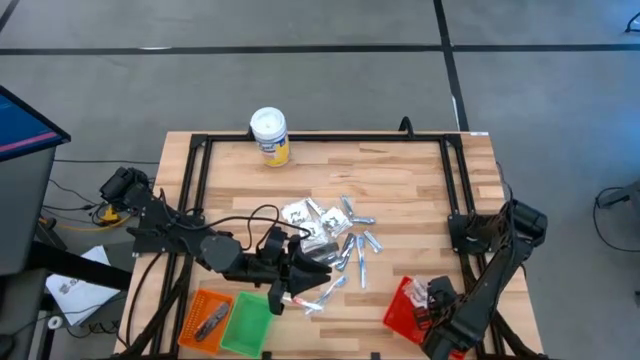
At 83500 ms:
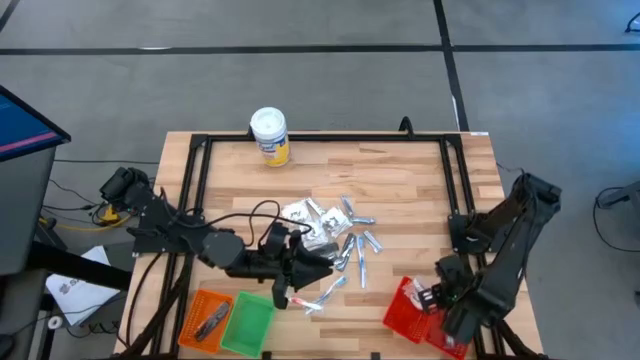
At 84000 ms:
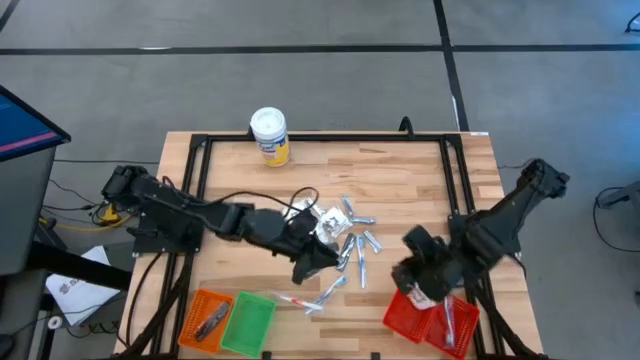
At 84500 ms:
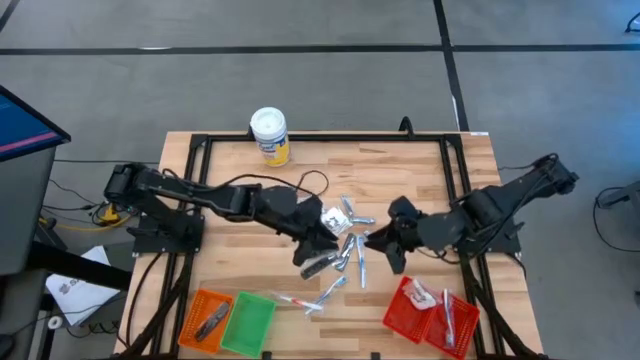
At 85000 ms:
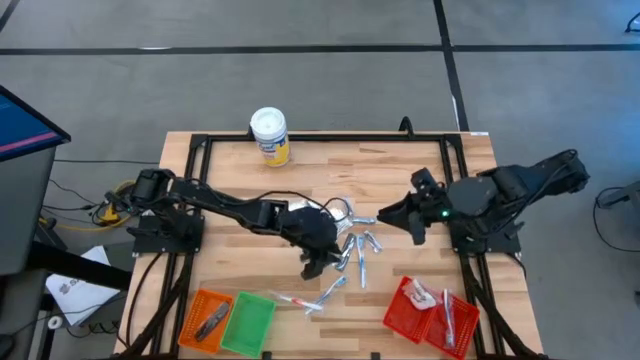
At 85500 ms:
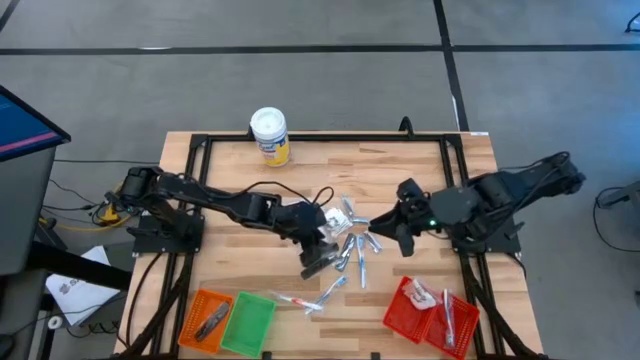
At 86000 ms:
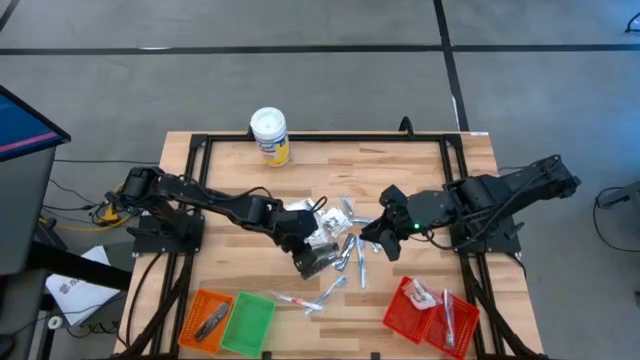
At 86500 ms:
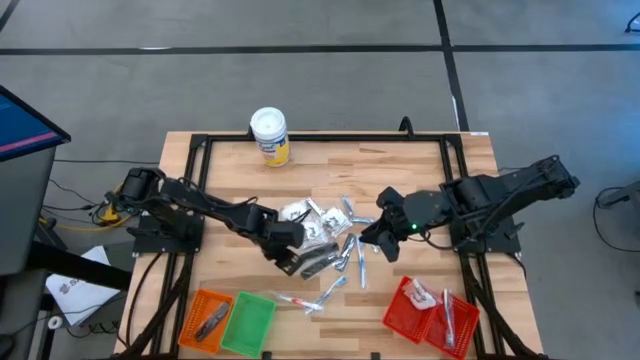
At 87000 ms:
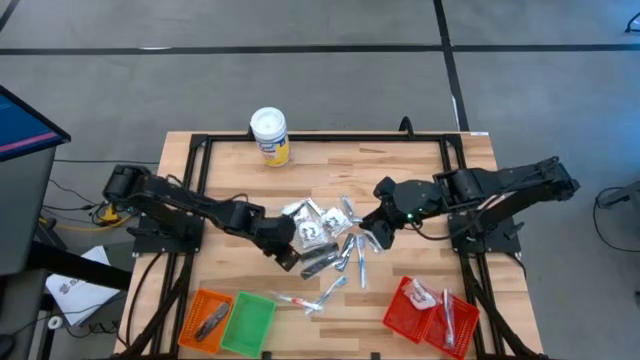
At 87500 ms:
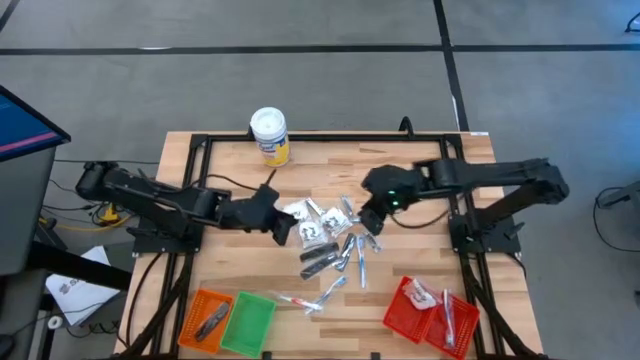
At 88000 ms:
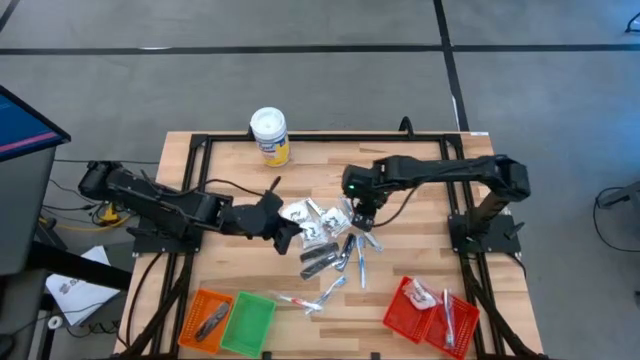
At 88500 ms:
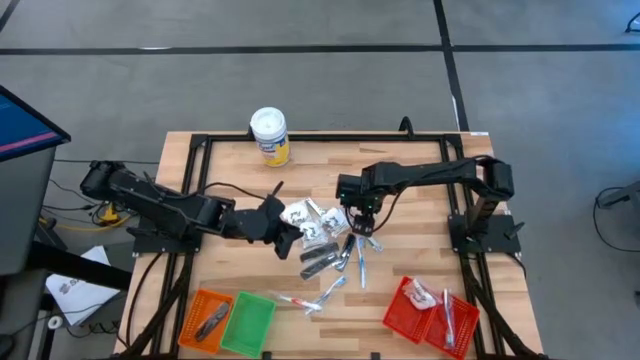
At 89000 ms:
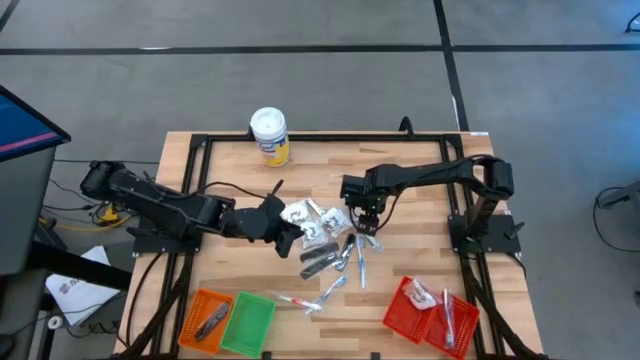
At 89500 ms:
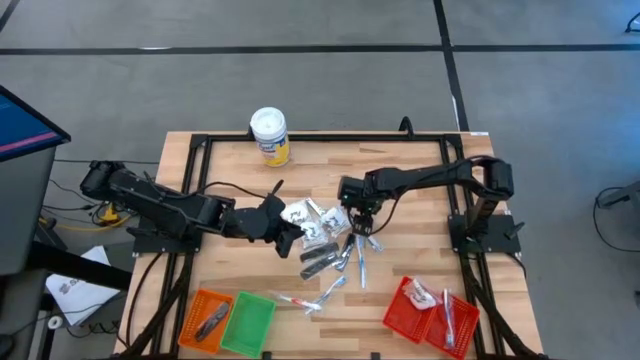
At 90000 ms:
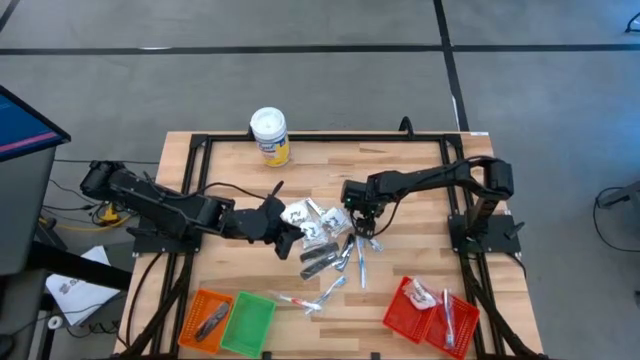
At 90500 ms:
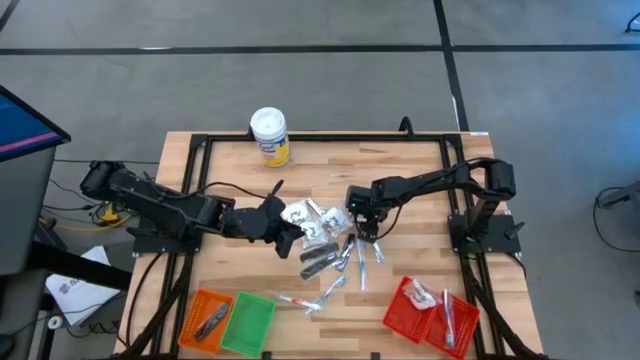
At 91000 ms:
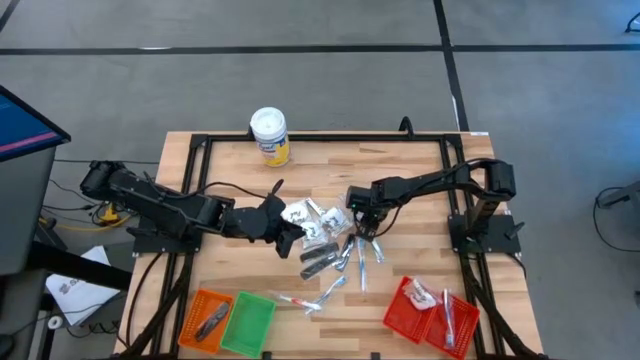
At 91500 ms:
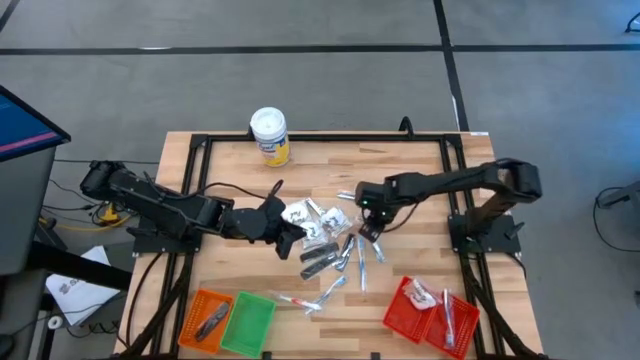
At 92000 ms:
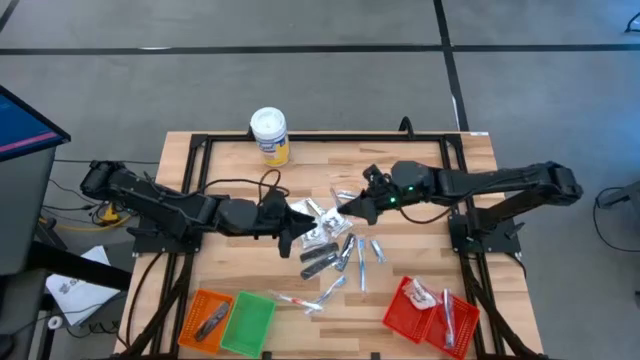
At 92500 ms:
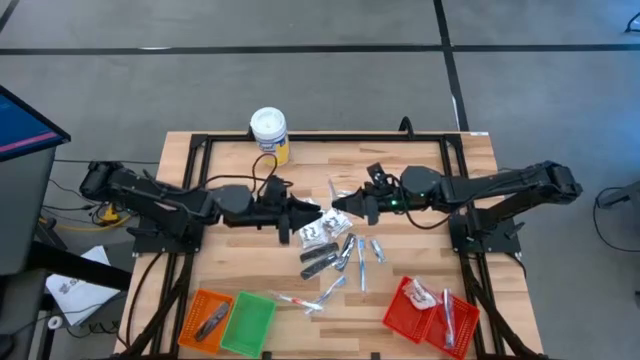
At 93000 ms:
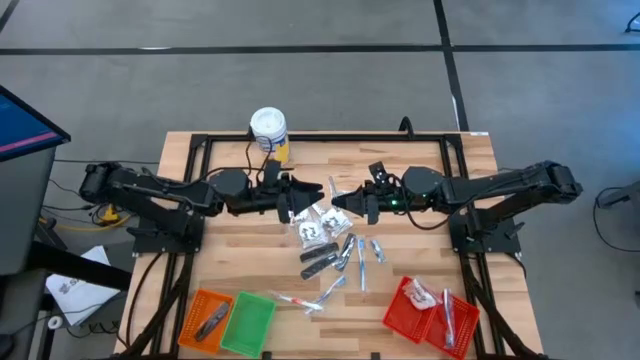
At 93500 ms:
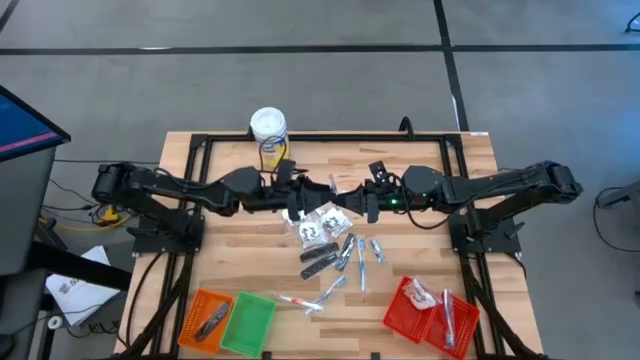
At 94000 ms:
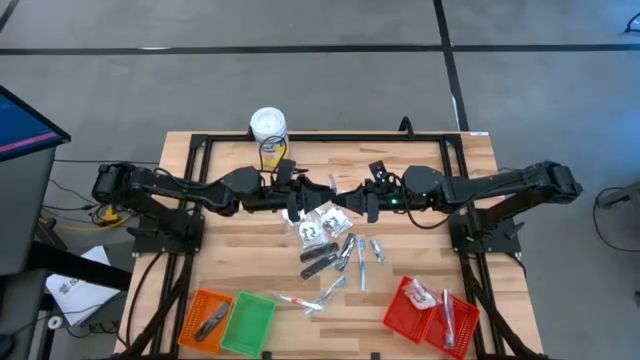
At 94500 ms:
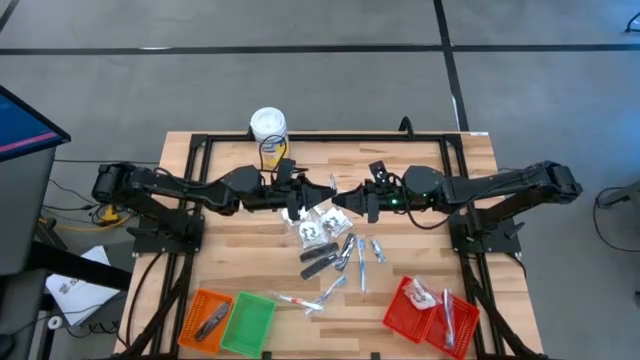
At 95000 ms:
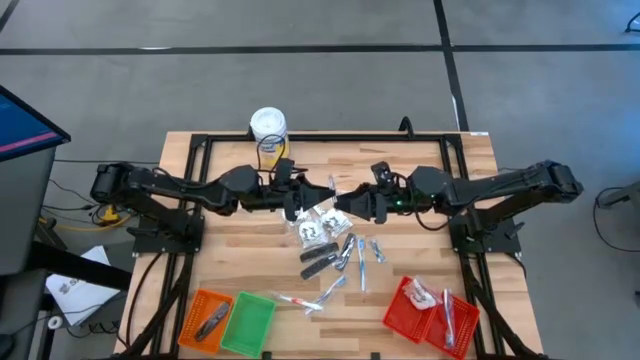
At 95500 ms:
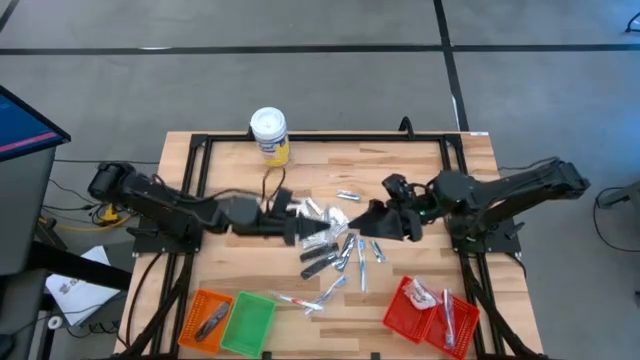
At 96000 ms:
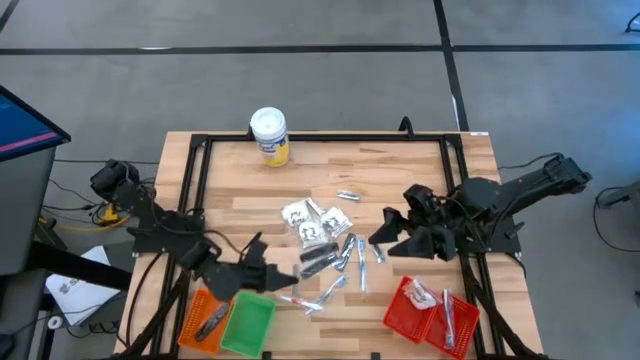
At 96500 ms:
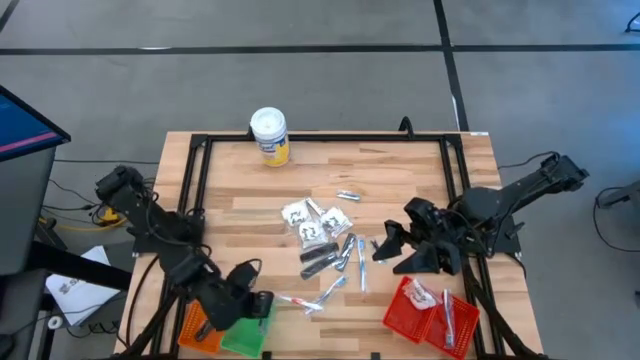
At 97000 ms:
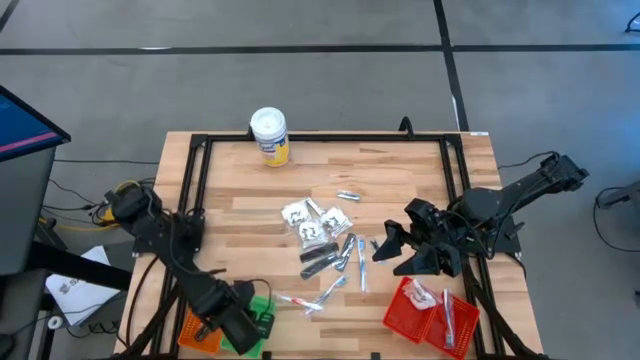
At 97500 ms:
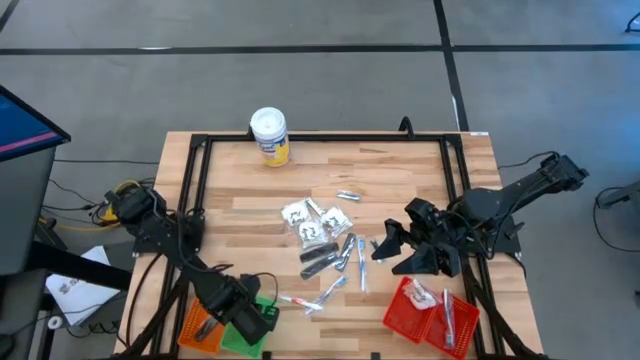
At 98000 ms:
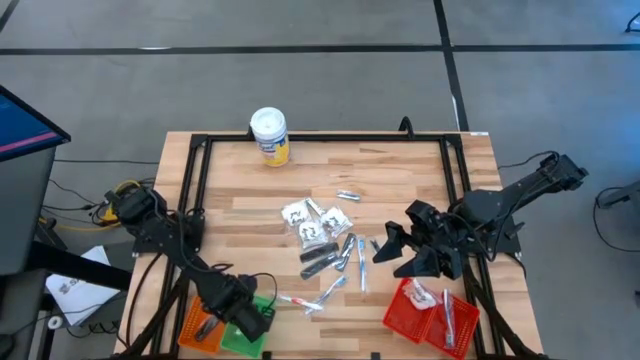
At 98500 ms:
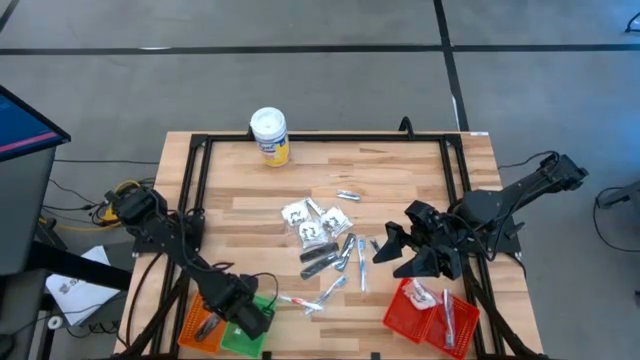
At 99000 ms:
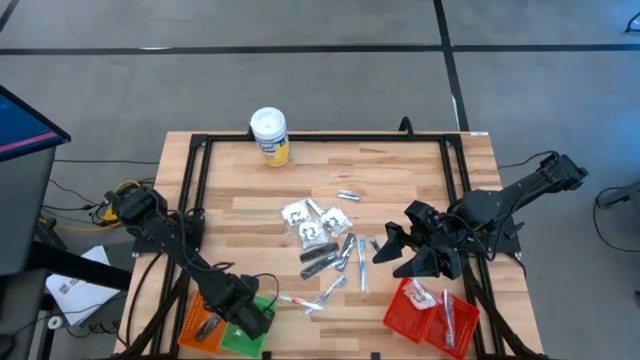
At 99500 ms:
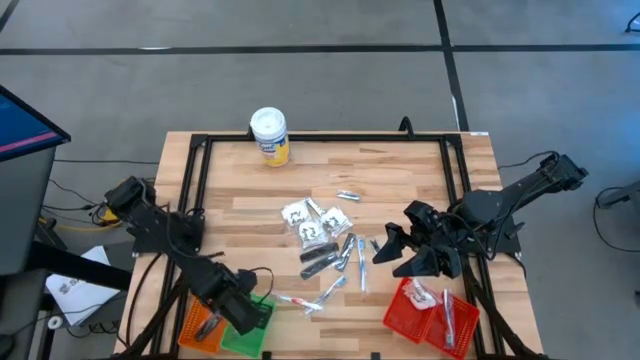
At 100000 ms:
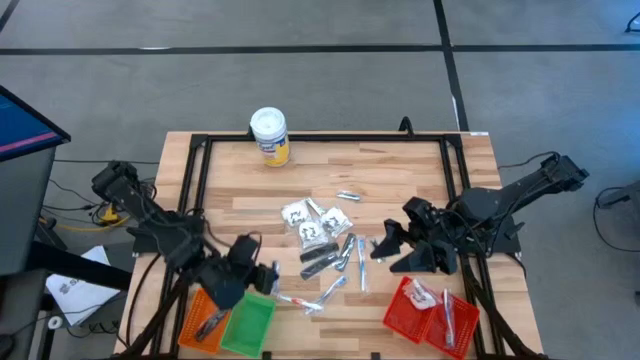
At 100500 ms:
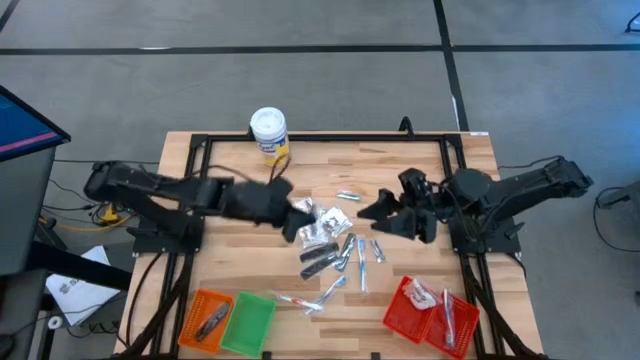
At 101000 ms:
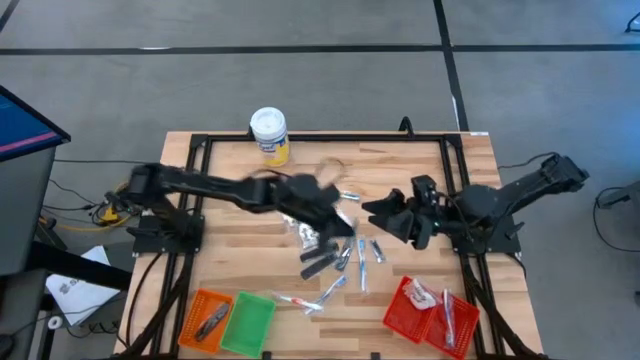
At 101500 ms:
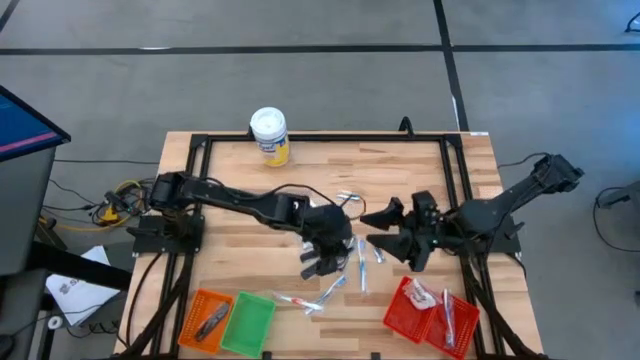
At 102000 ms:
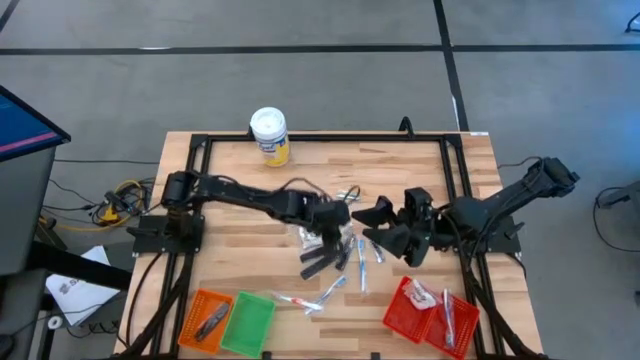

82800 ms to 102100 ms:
Task: Pick & Place Travel size toiletries
Put the nail cutter into the green basket
